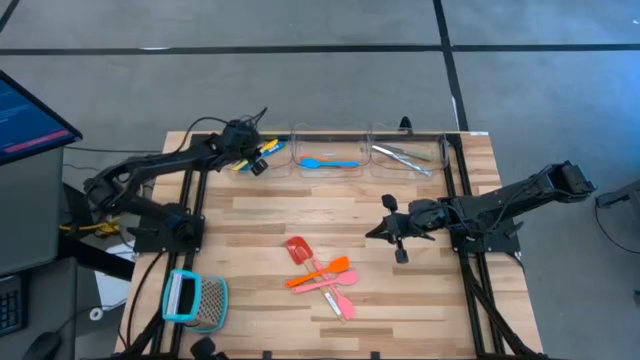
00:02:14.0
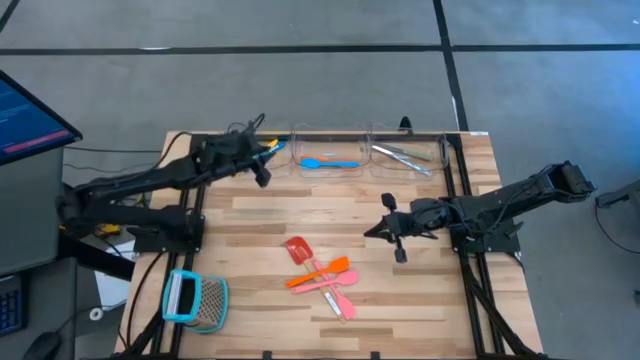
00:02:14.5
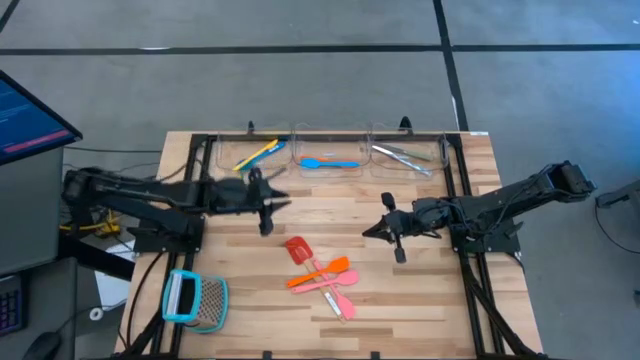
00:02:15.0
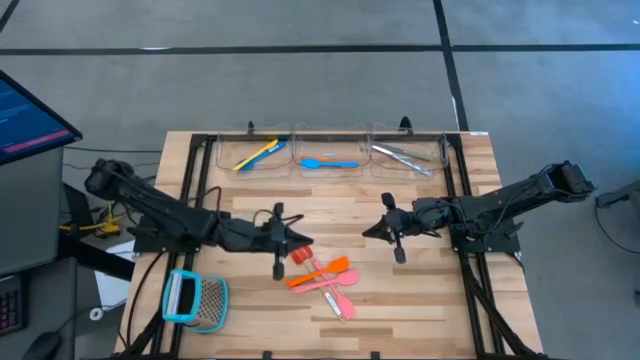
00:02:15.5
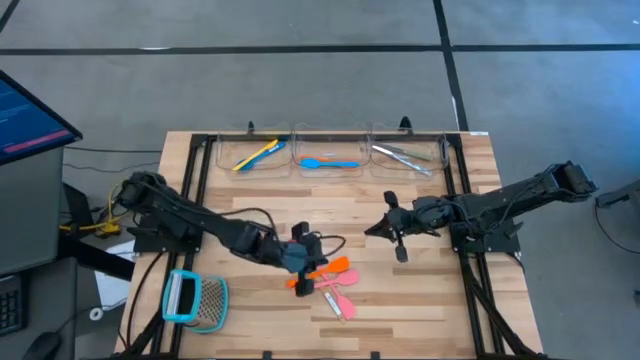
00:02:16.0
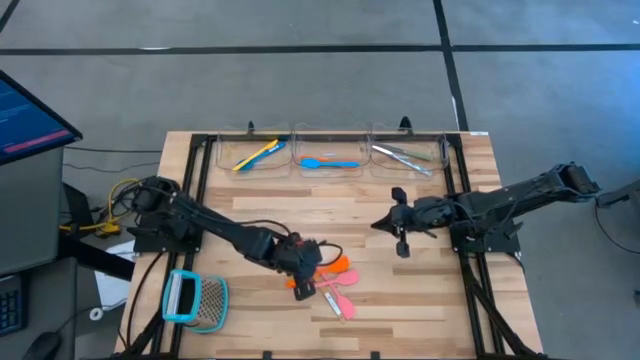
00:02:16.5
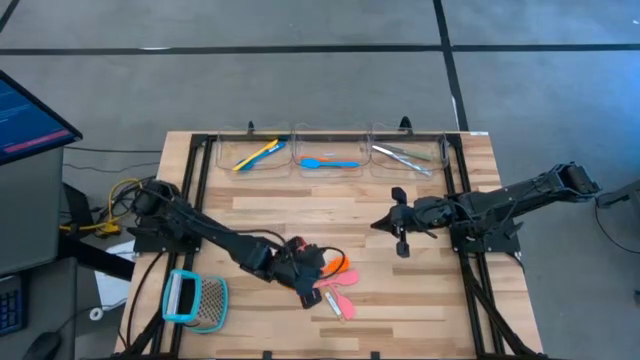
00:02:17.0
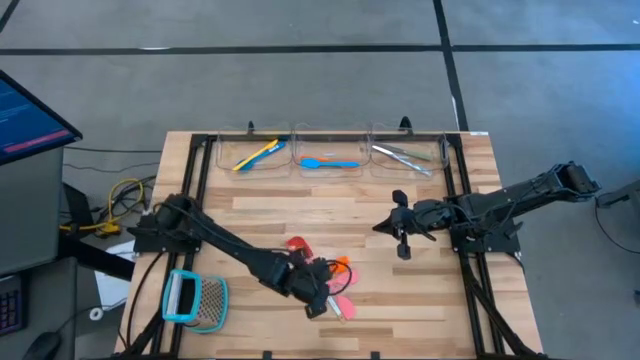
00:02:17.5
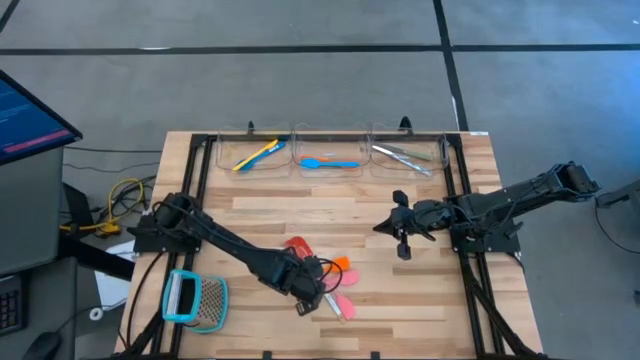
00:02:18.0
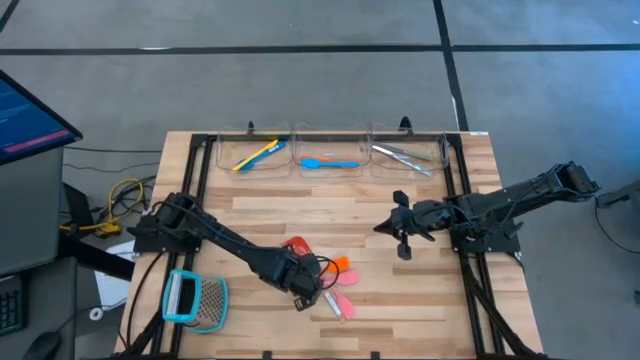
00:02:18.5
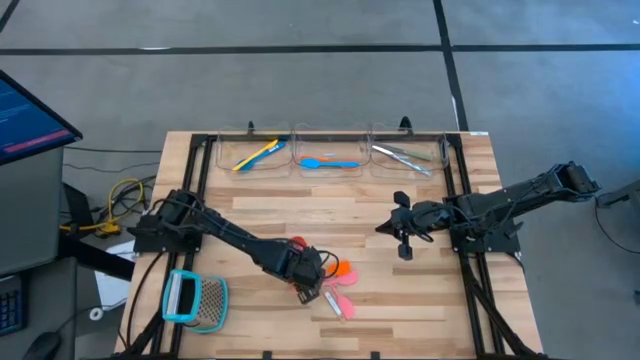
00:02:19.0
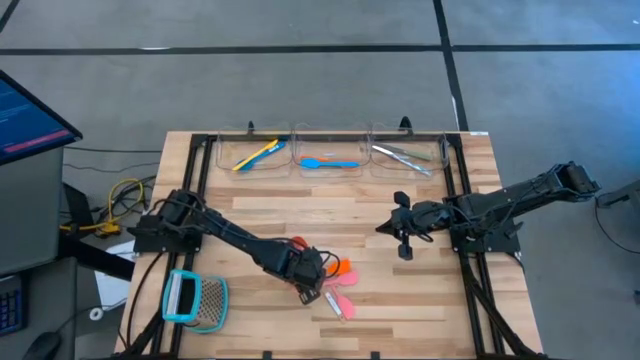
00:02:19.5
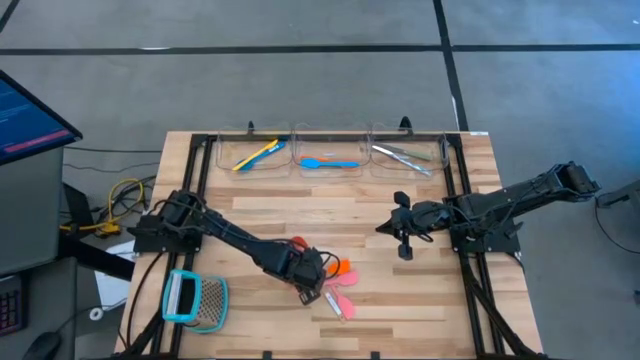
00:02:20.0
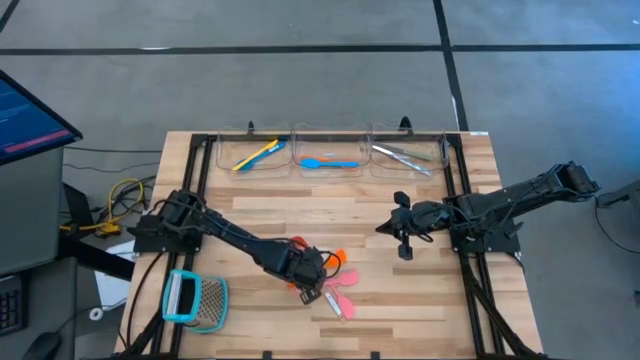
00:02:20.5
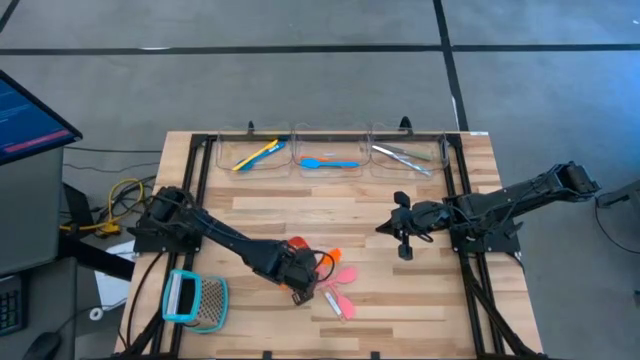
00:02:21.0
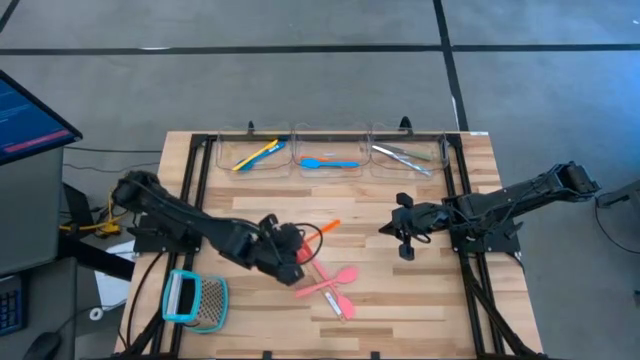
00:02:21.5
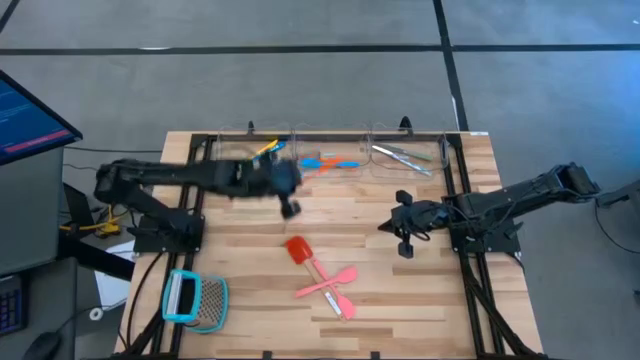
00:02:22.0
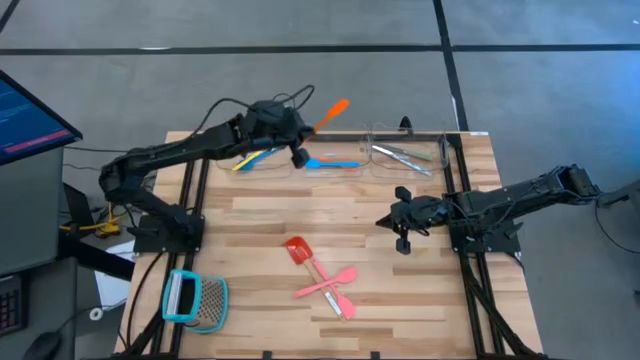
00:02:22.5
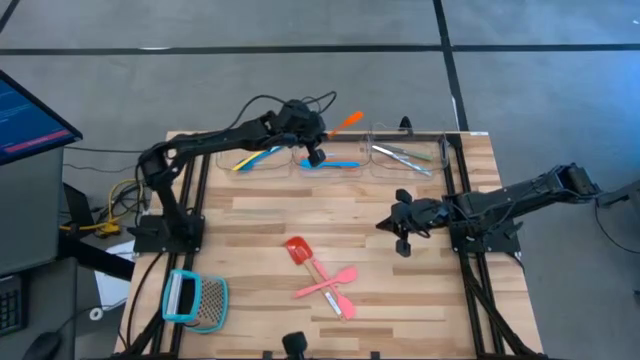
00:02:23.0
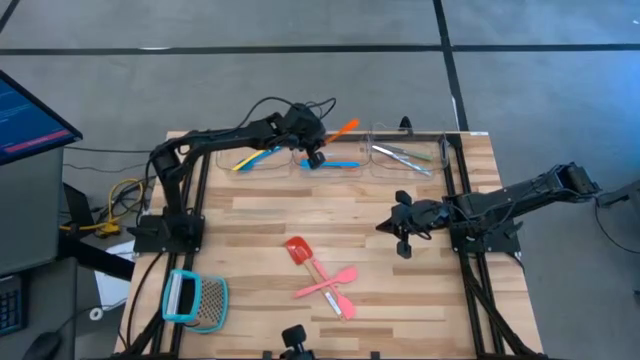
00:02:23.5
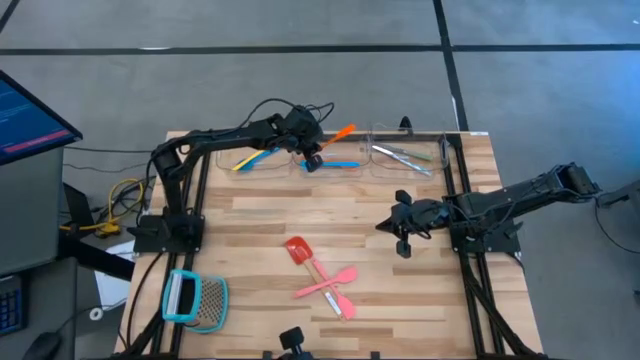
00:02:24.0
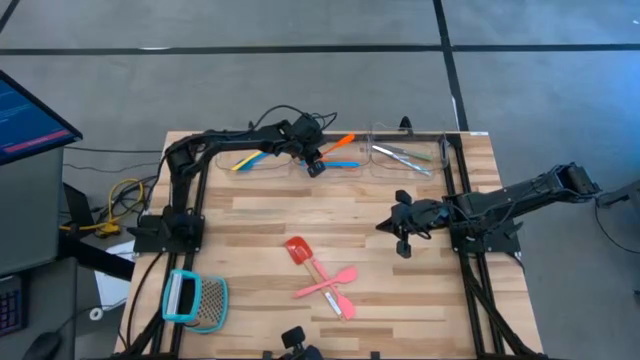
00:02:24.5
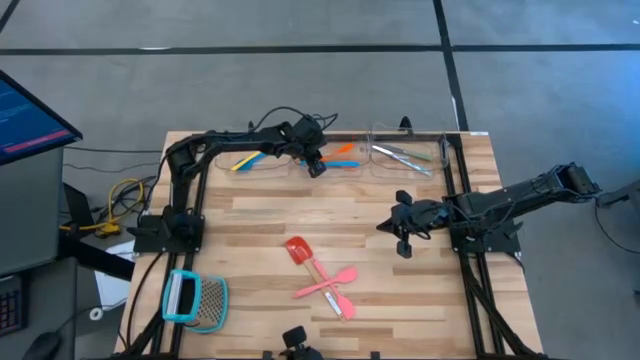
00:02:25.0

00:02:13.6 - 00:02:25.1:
Task: Pick & Place Kitchen Items
Put the orange spatula into the middle transparent bin

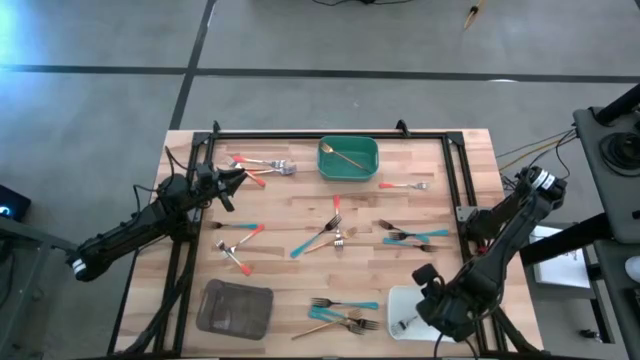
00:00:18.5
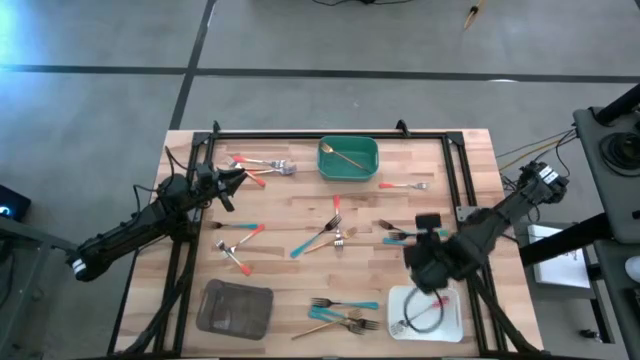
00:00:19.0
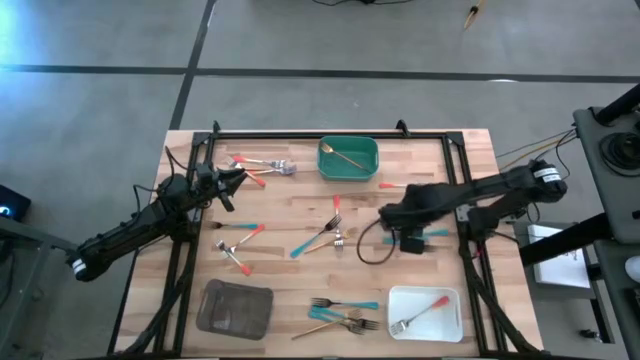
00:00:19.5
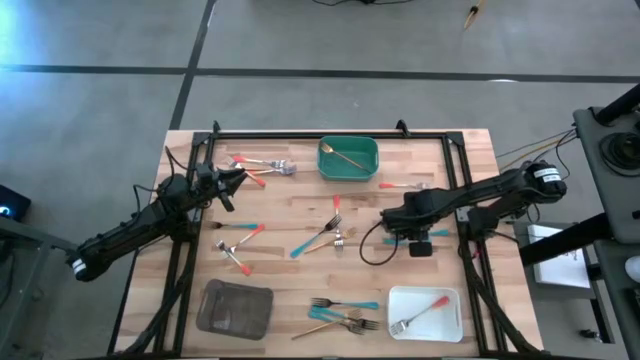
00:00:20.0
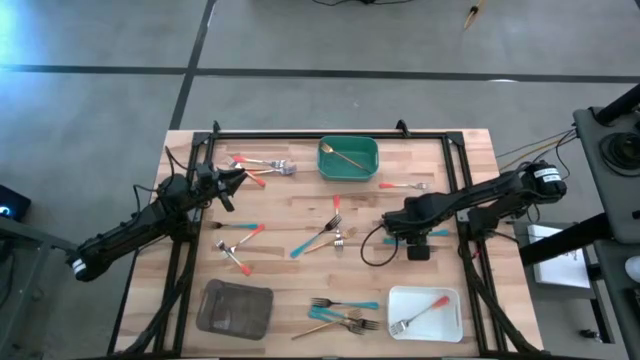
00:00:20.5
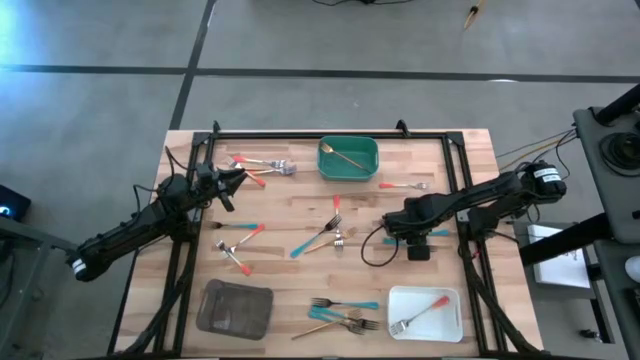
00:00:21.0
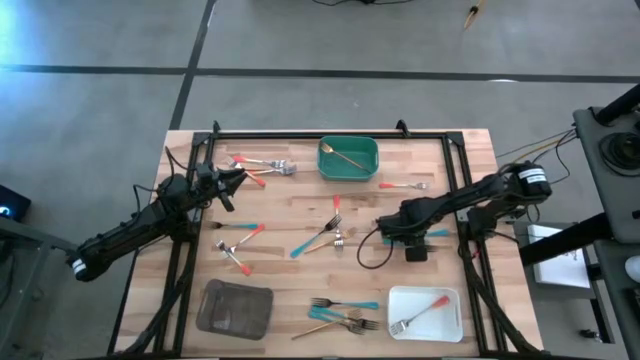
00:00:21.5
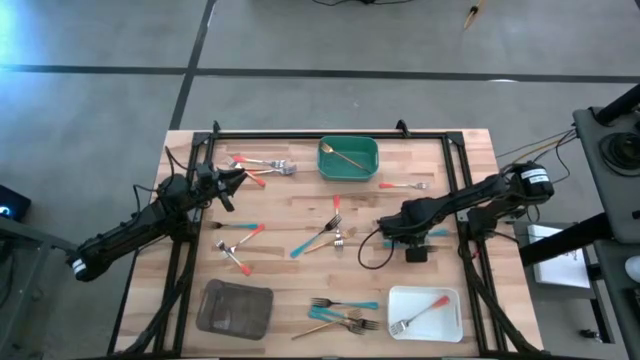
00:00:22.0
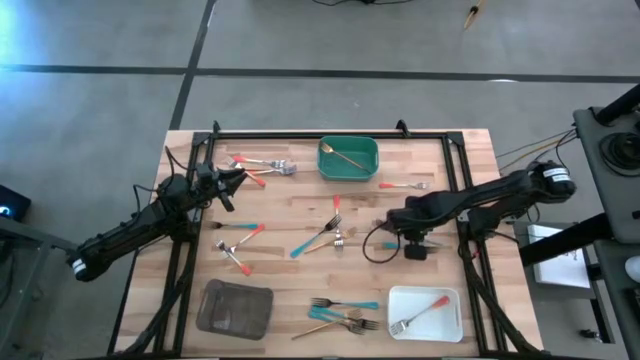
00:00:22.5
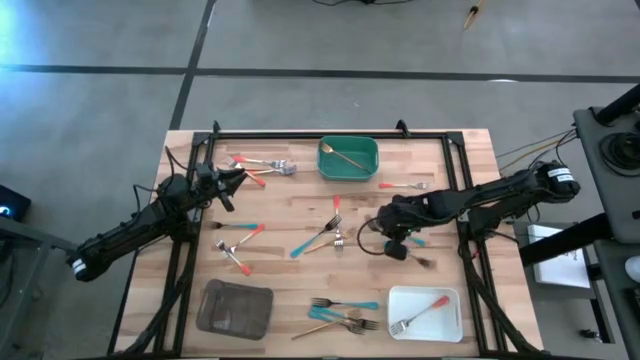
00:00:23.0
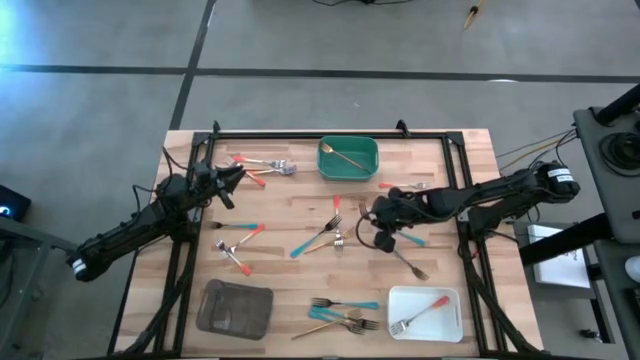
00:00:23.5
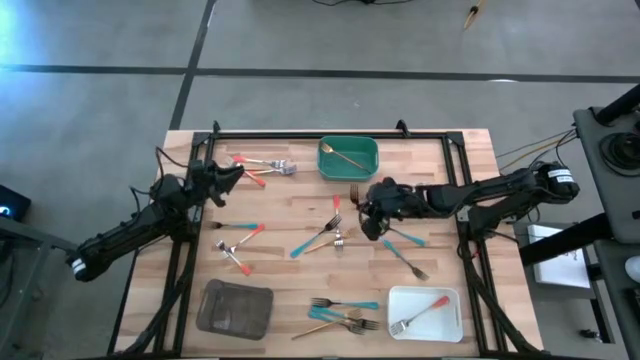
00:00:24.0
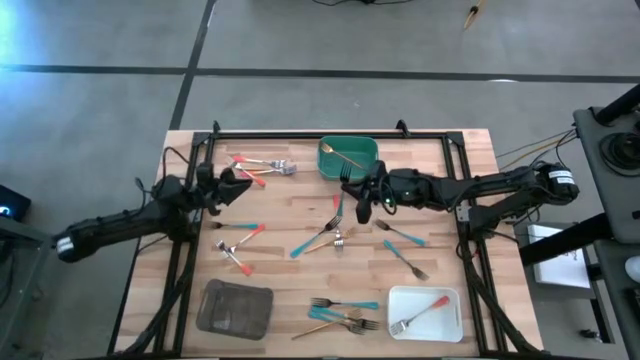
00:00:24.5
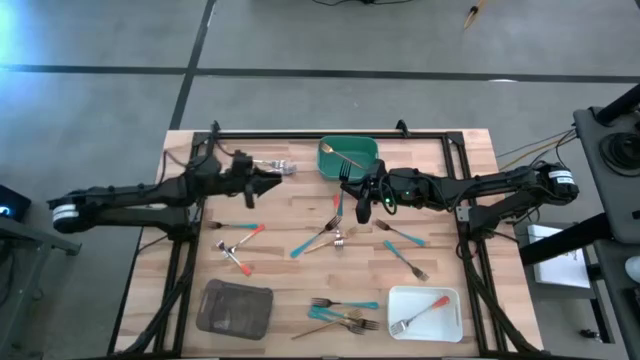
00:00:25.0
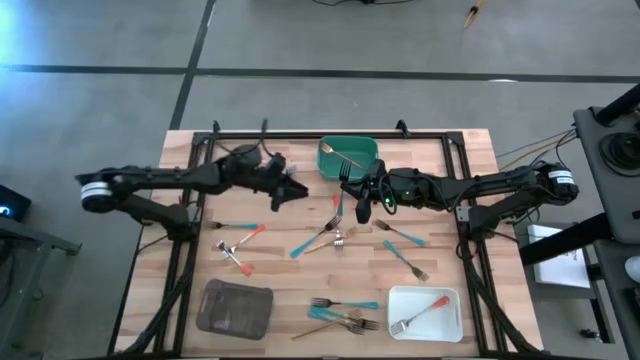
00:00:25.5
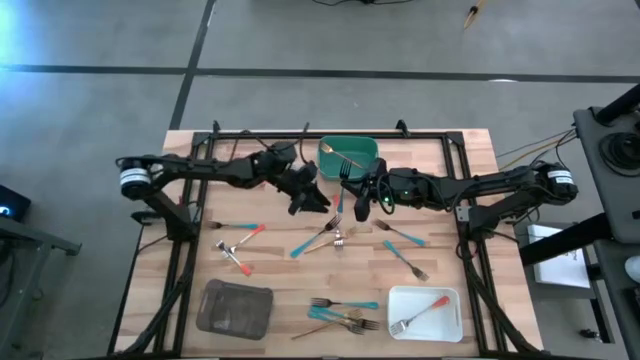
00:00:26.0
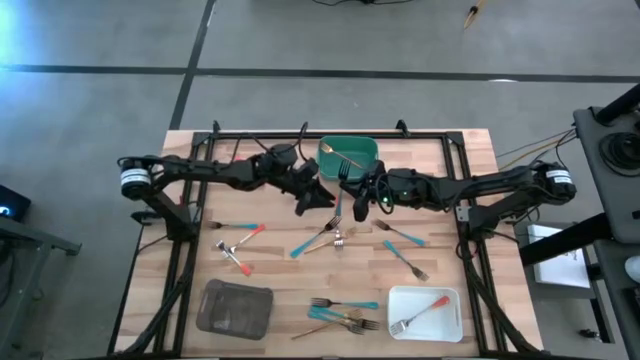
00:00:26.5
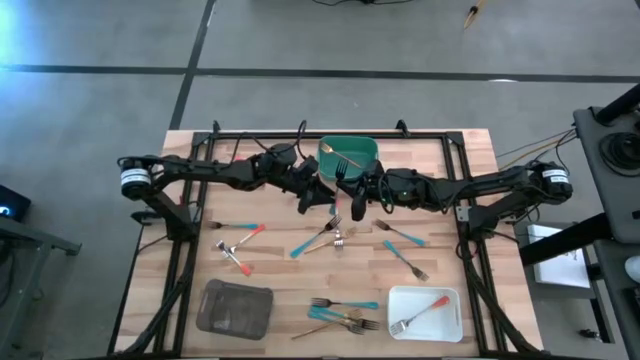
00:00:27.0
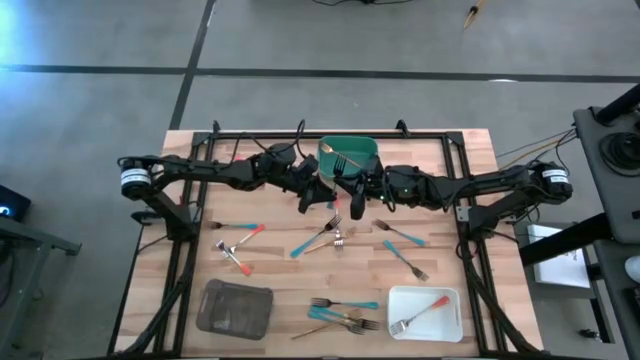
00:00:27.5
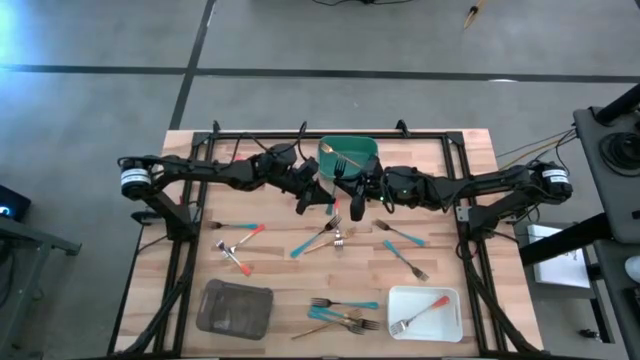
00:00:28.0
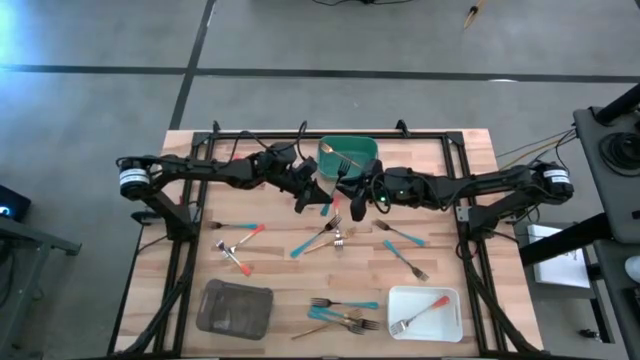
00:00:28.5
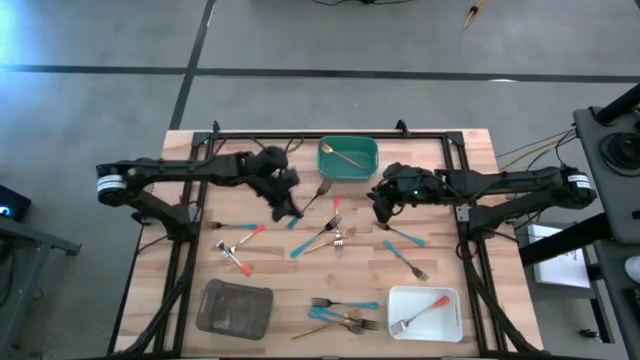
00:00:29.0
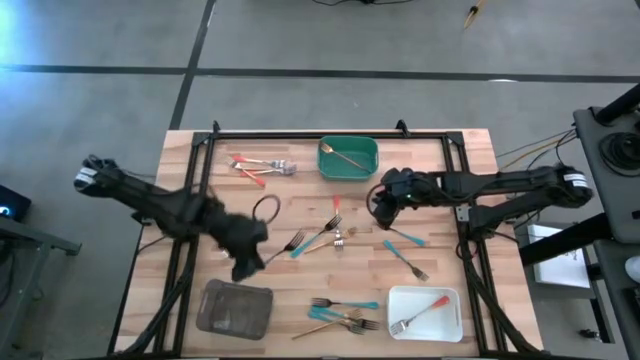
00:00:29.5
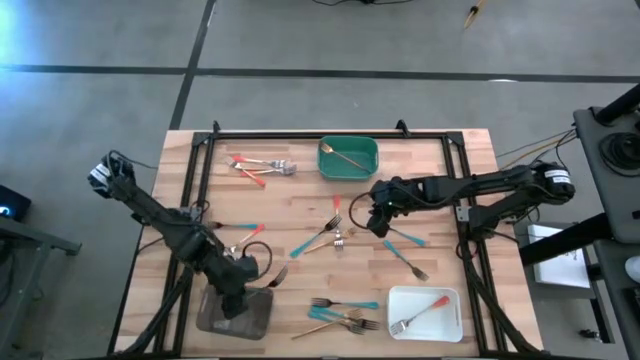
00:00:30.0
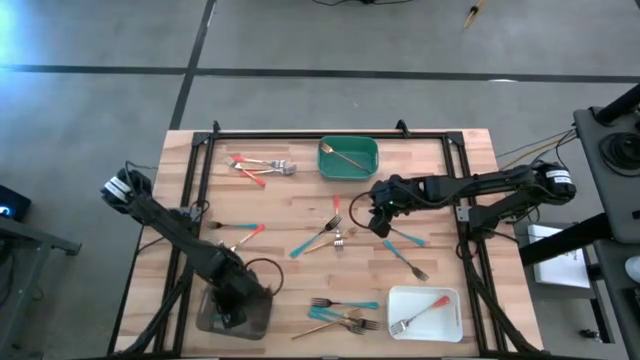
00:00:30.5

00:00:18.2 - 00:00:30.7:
Task: Sort silverware by color (type)
Put the blue fork into the black bin
